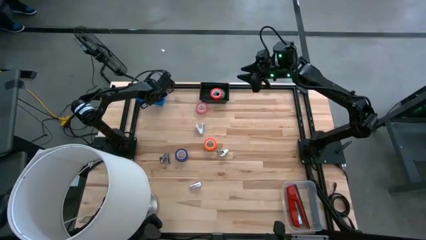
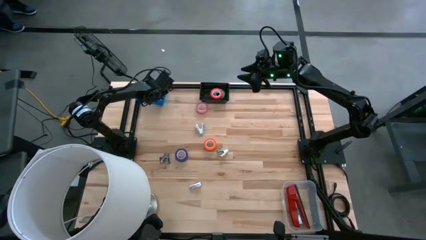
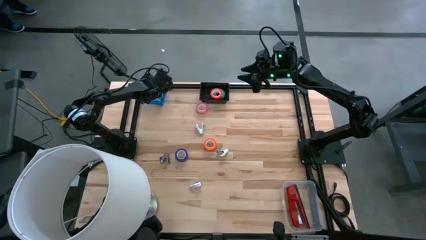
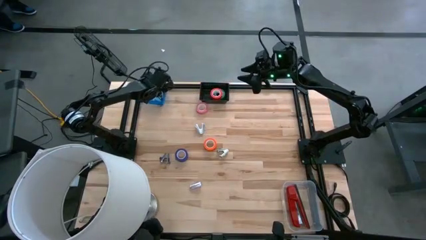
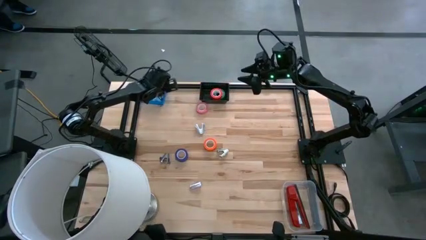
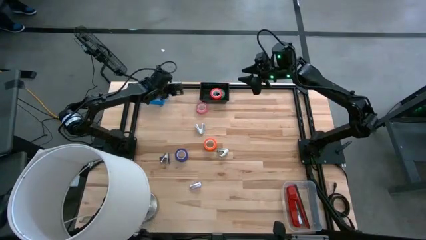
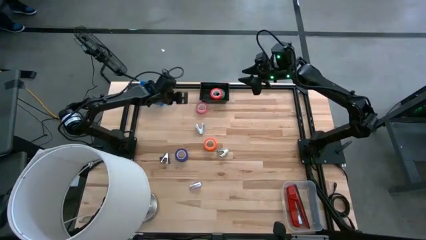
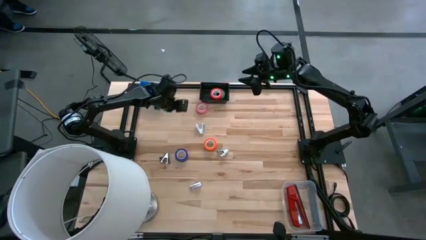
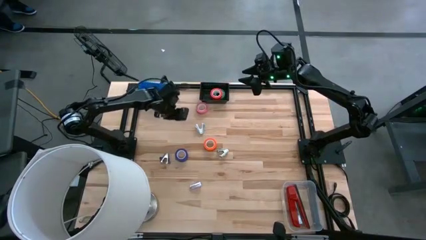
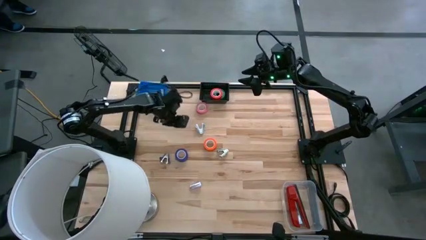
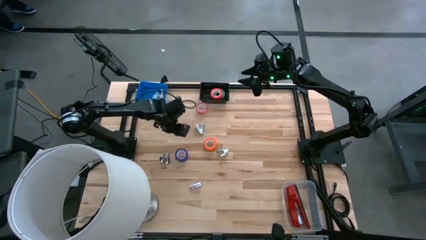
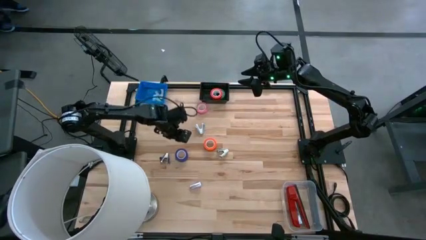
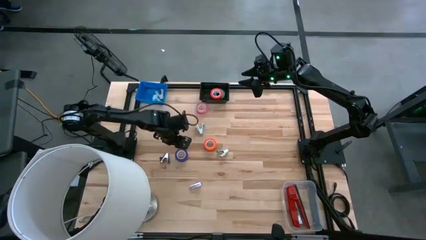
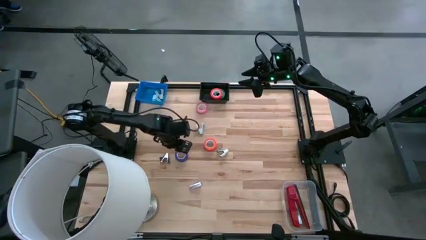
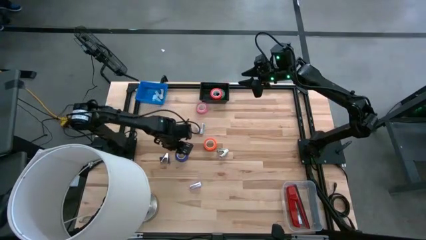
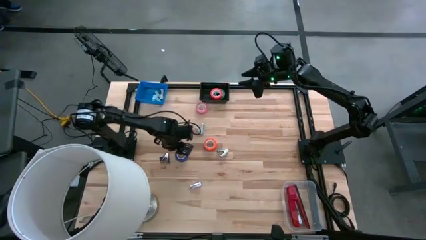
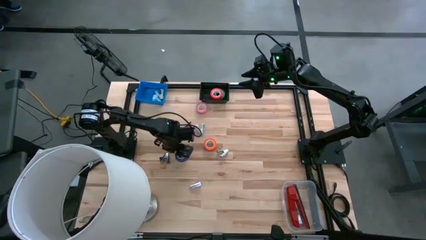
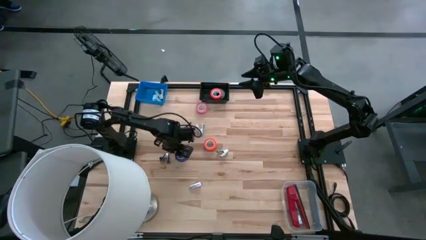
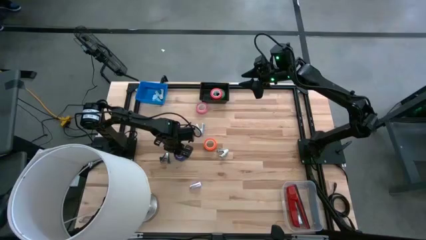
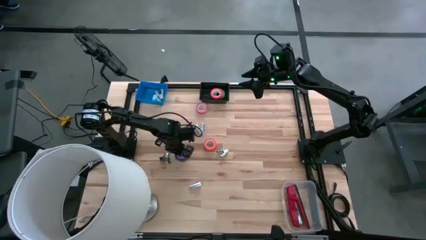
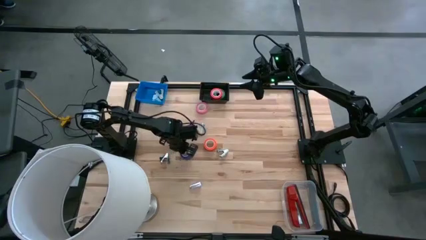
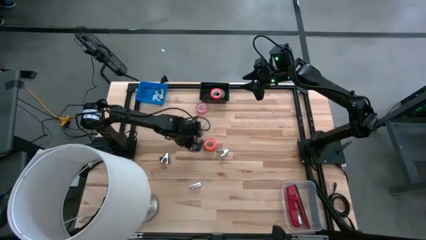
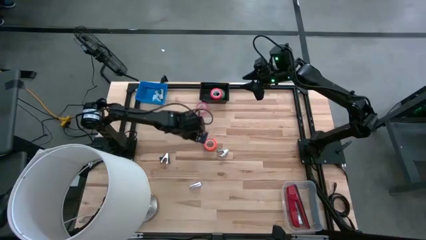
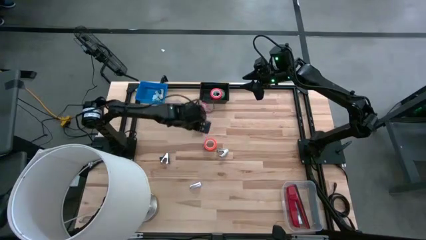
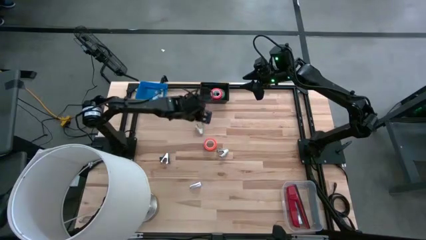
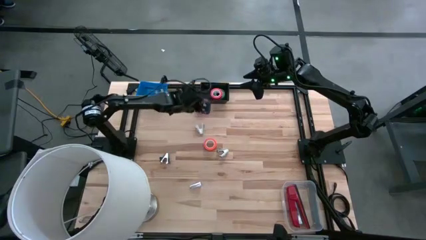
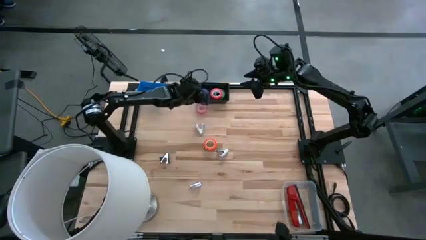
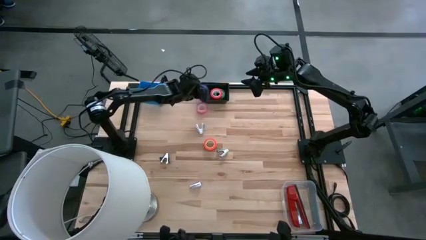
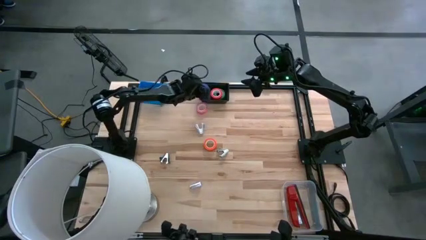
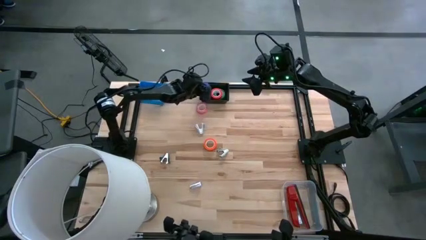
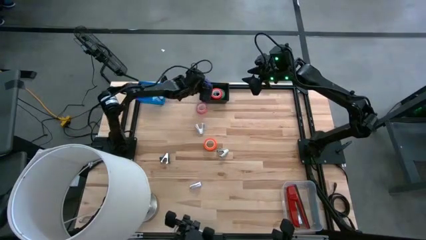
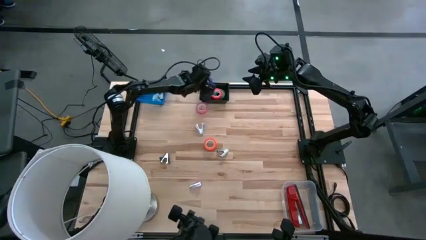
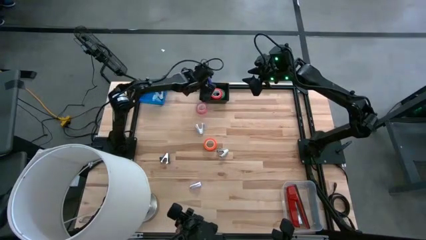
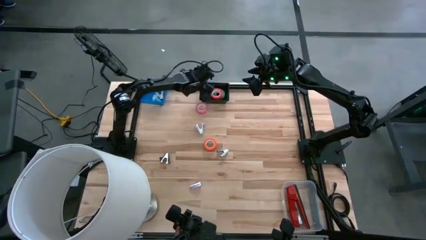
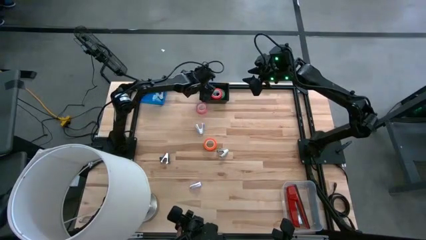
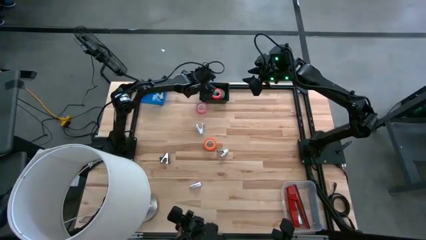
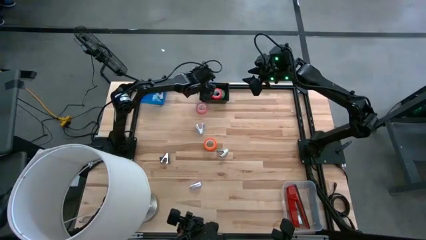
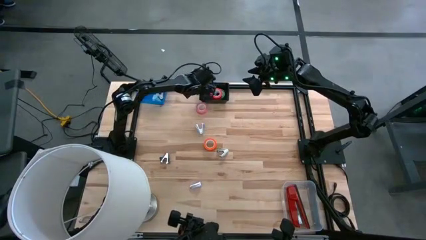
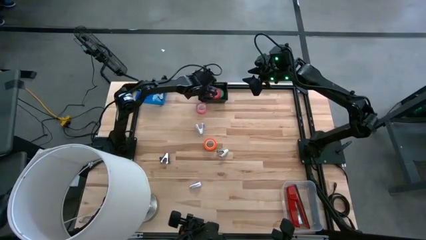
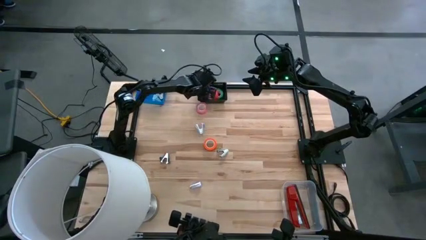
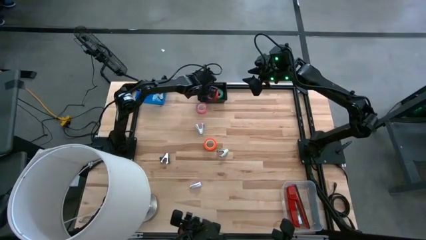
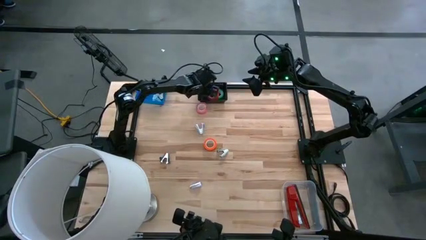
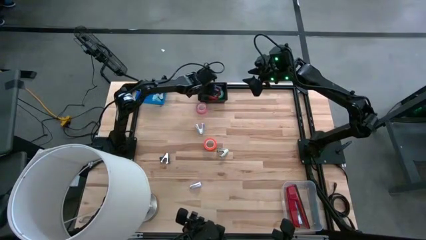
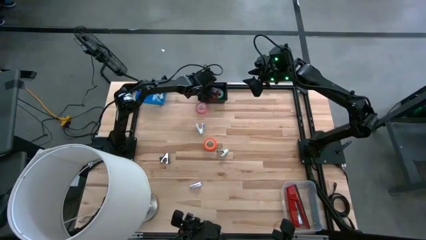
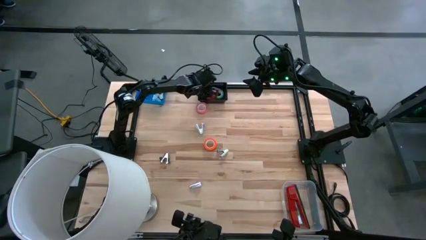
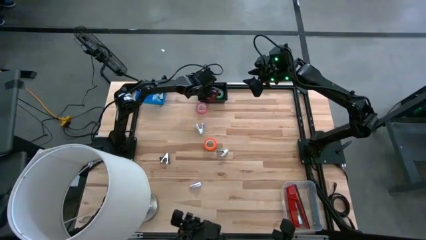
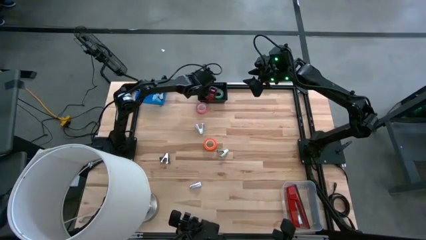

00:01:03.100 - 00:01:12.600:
Task: Pick and place Stapler, Stapler remover, tape
Put the blue tape into the black bin

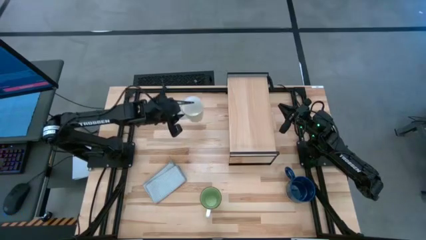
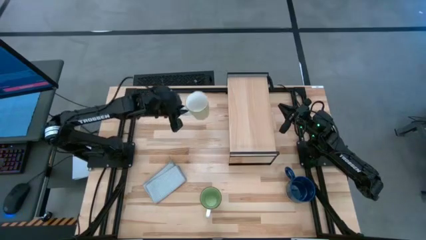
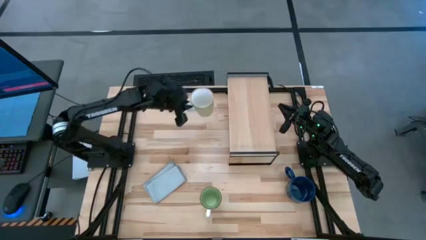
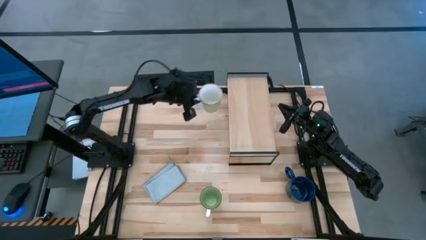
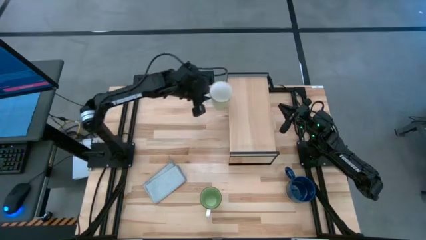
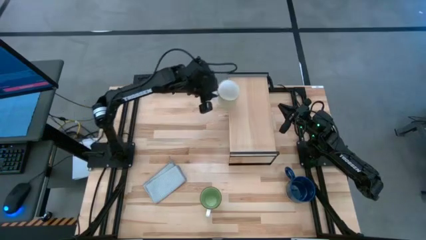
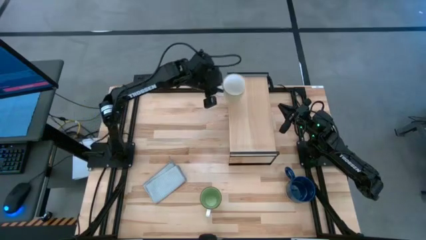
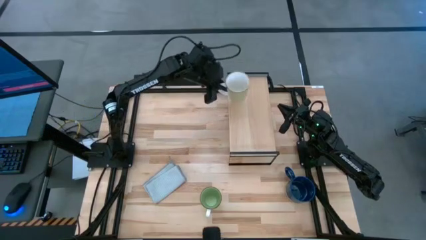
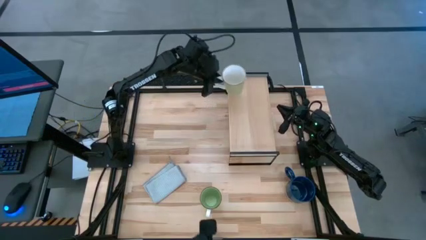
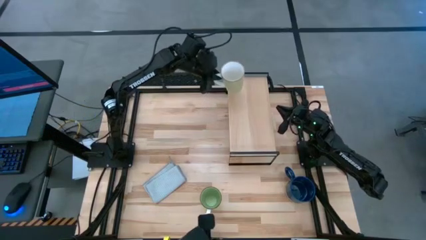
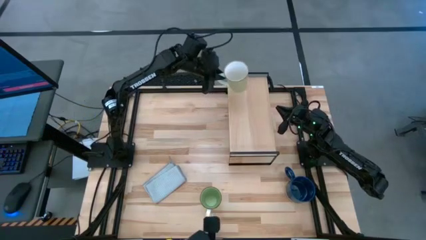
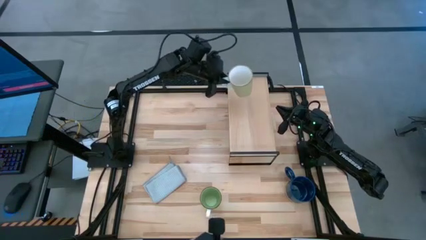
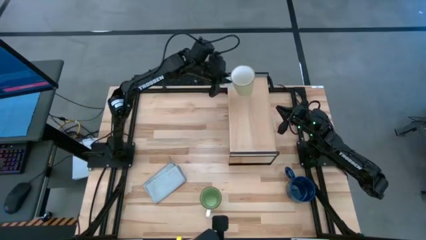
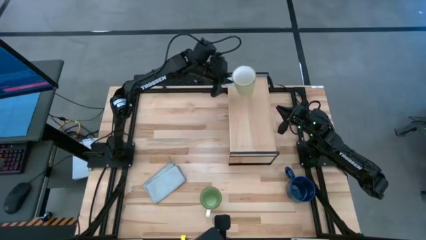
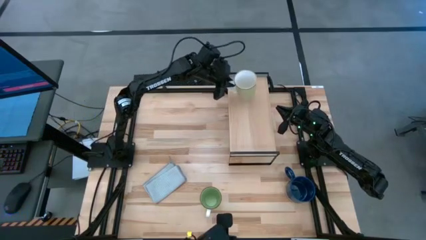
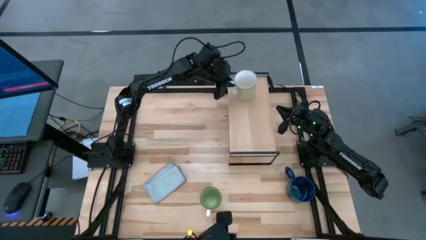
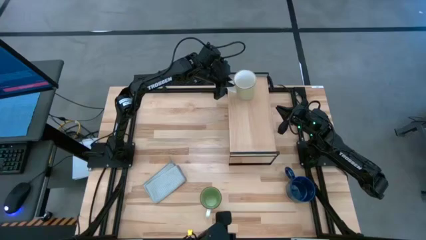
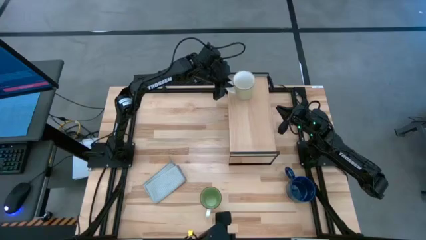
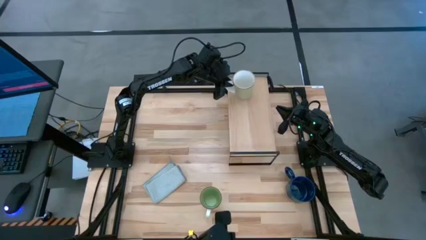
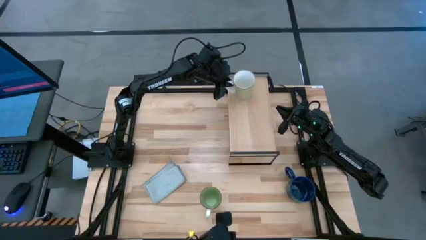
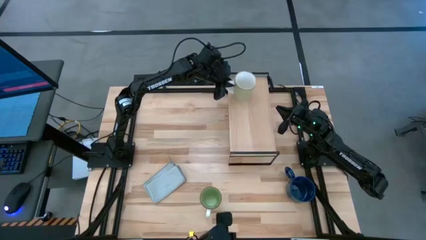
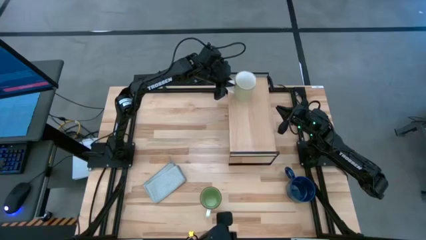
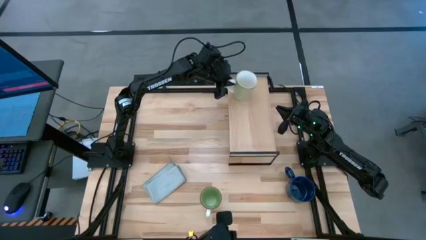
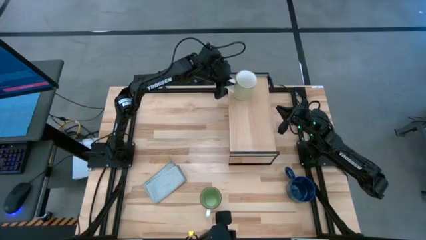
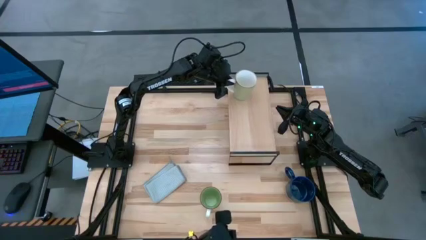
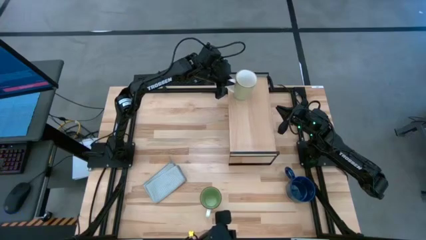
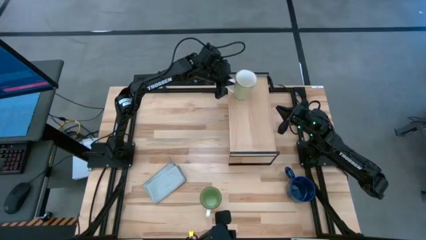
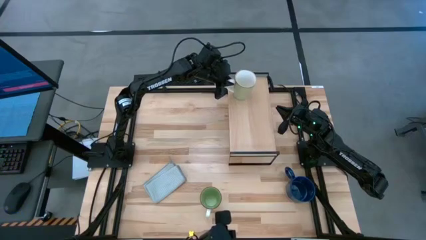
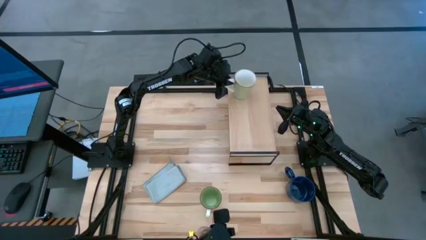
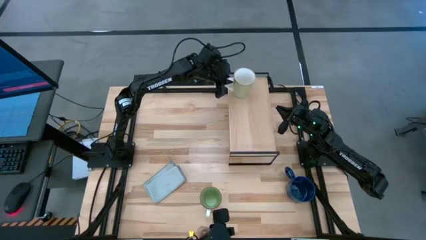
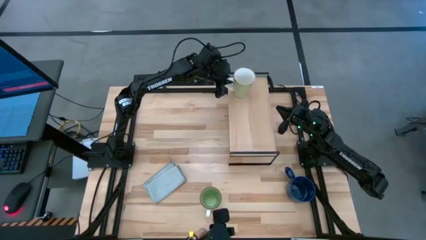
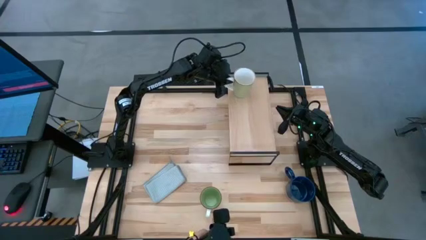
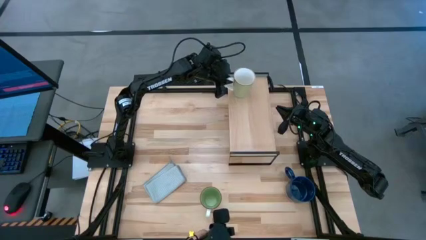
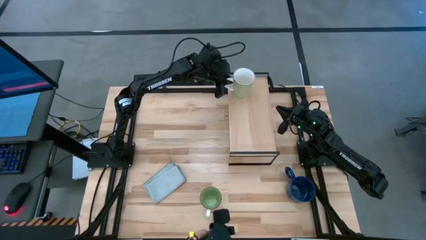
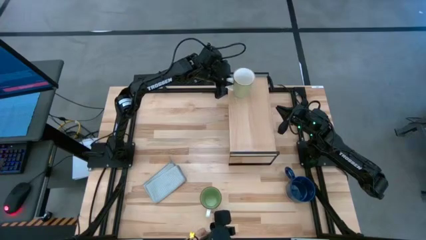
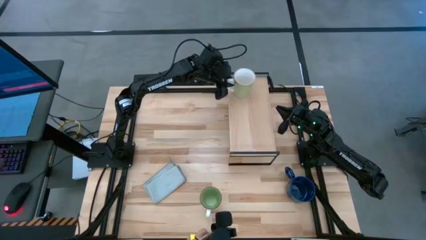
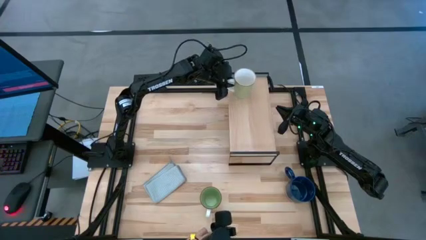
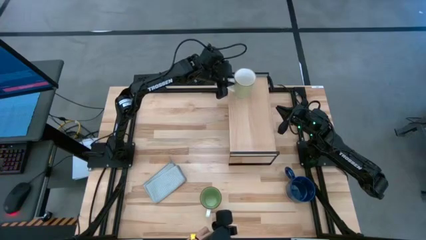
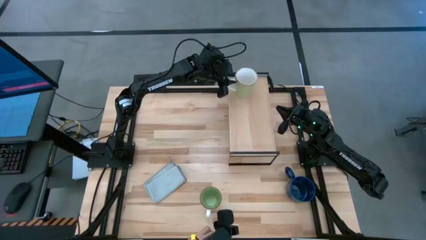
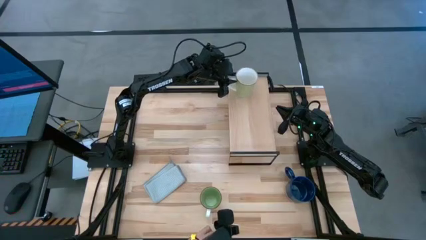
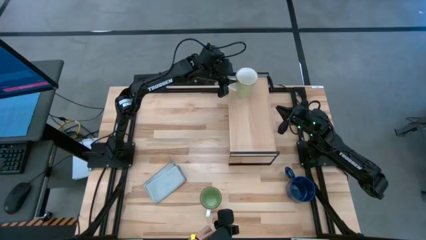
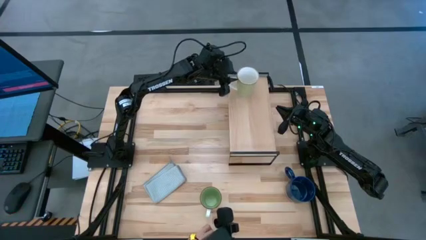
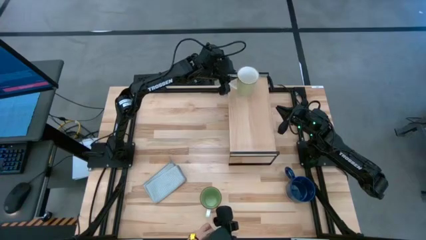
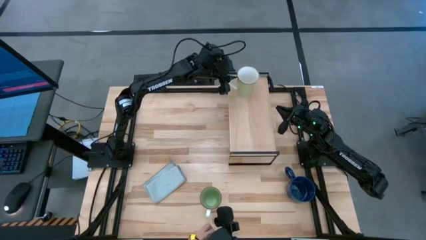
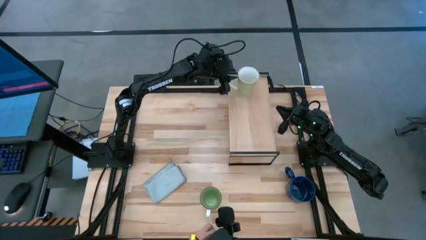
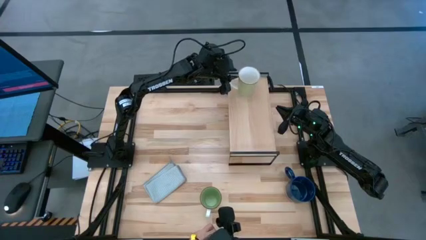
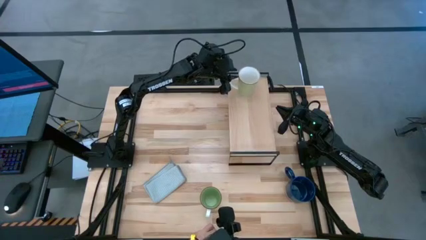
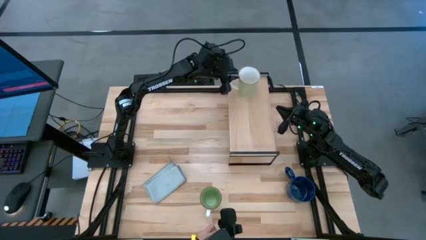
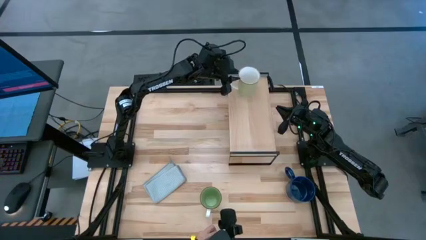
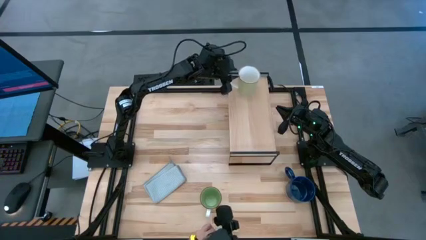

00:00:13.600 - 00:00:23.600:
Task: Stack small to large cups/mugs on shelf
Put the light green mug on the shelf
